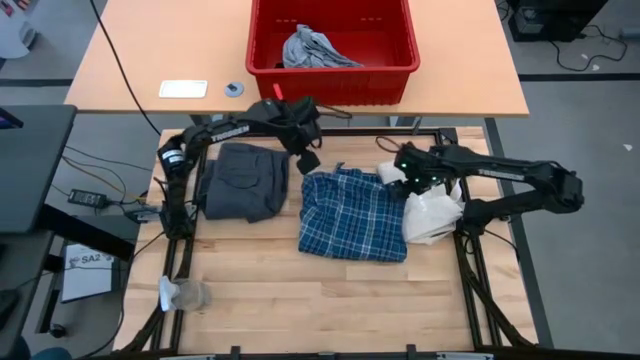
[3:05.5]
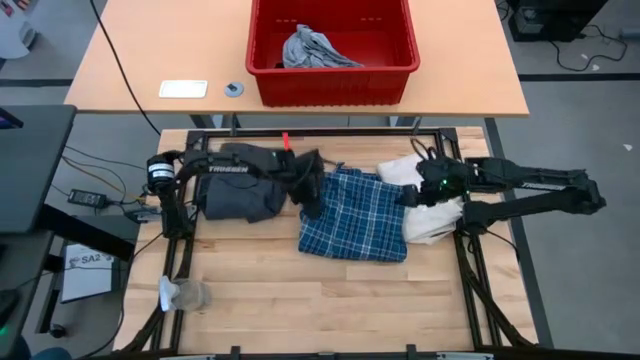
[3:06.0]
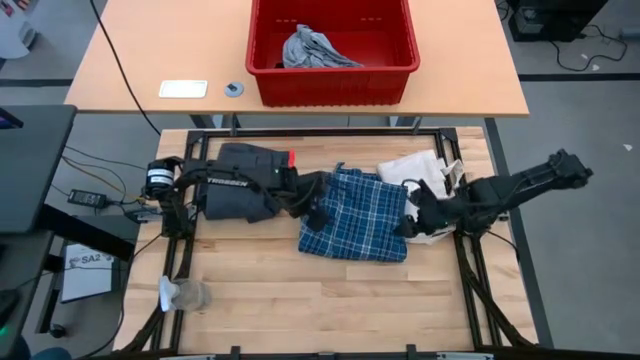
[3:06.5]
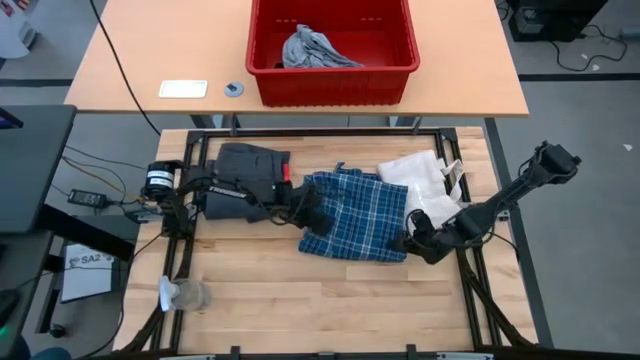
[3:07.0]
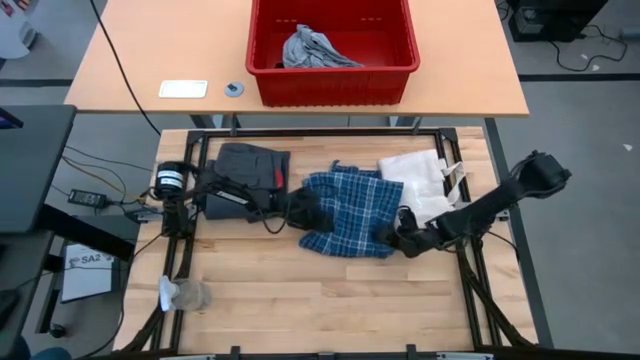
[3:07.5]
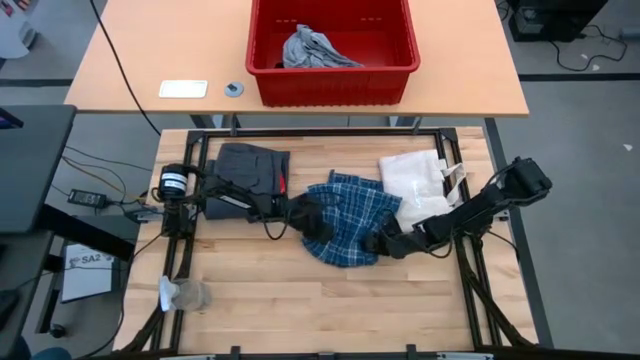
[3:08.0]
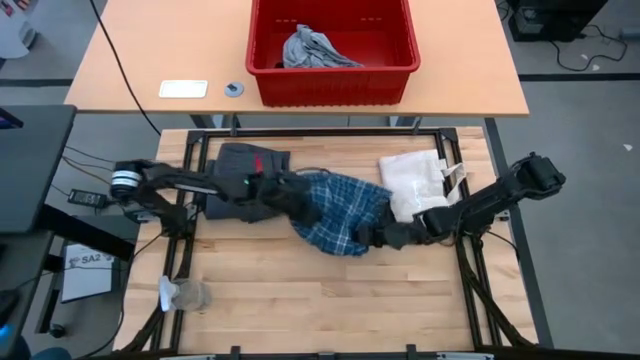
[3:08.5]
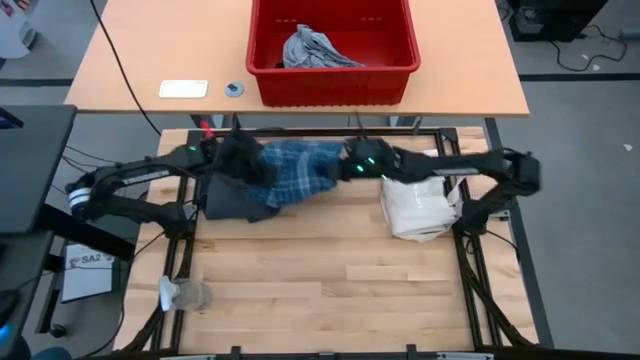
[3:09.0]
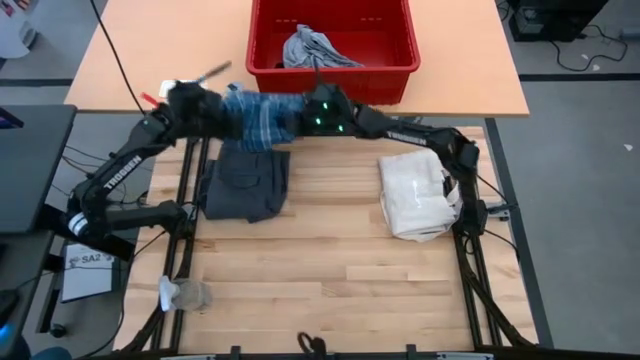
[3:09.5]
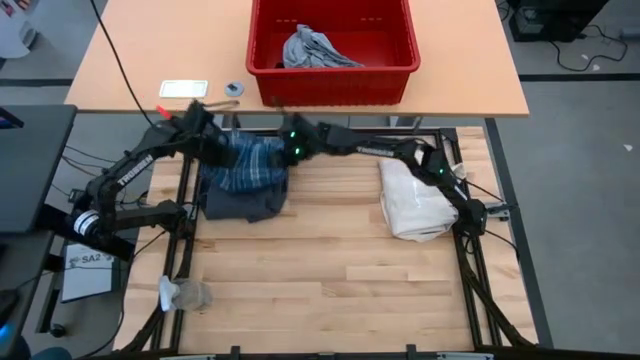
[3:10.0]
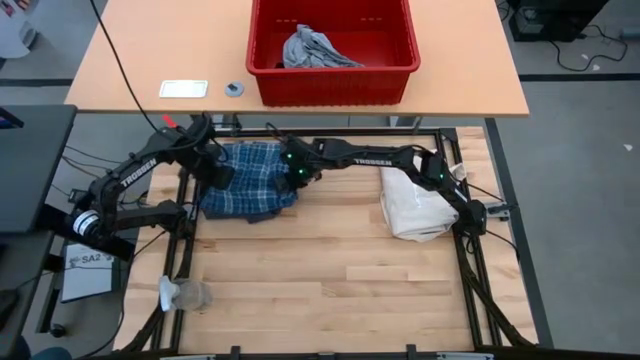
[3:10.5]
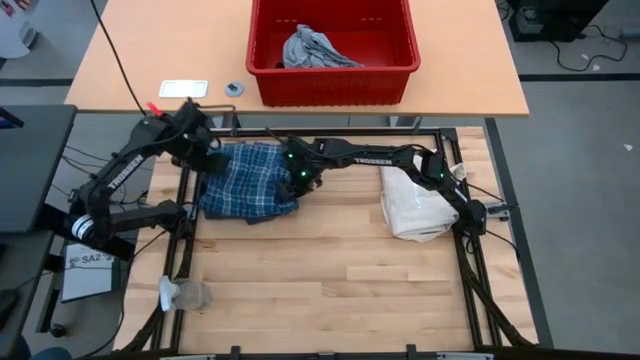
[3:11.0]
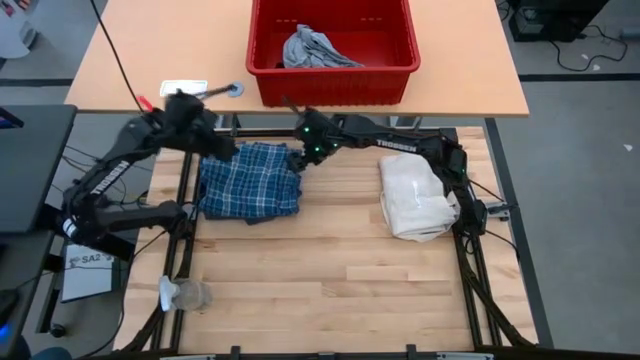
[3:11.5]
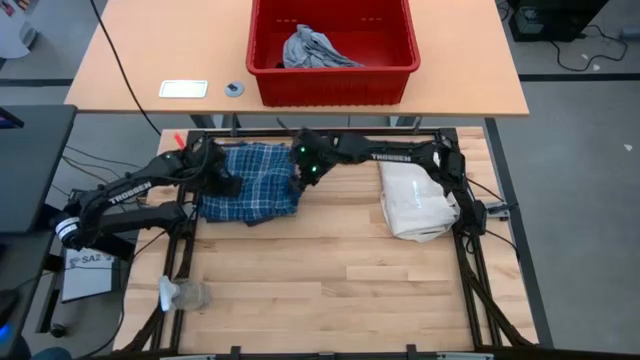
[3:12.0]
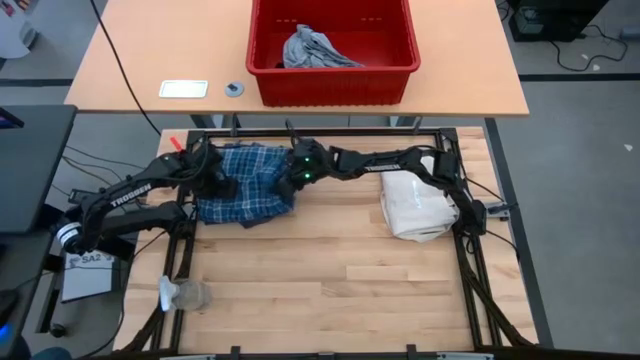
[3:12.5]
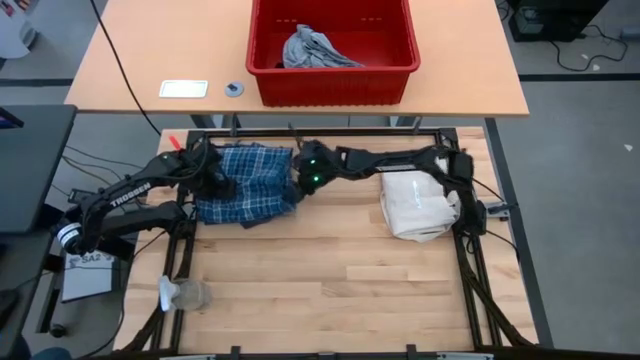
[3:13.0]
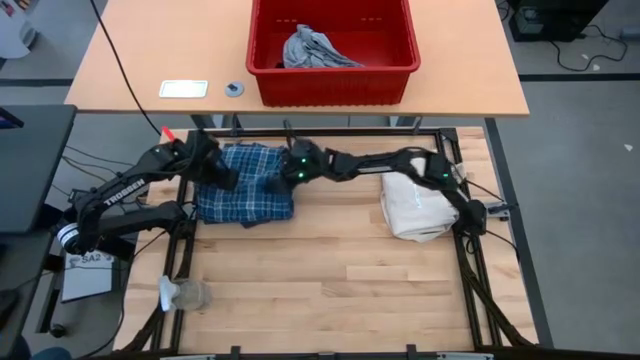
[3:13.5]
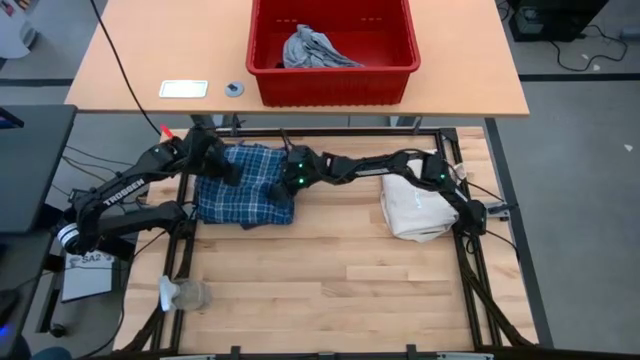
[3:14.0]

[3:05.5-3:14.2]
Task: Fold Laundry from Bin
Stack the plaid pants on top of the black shorts

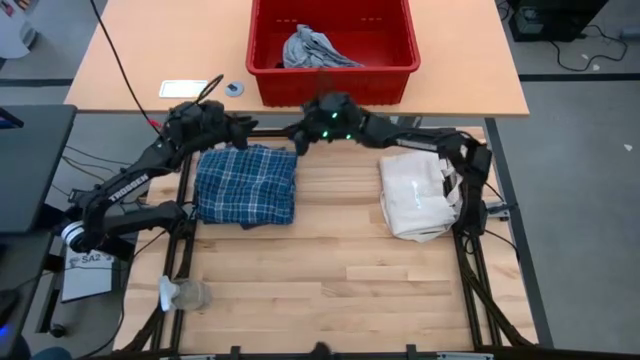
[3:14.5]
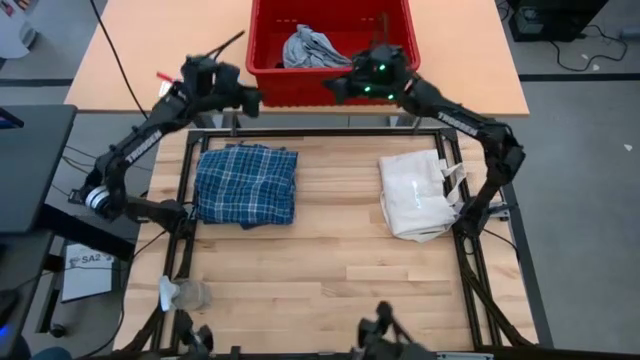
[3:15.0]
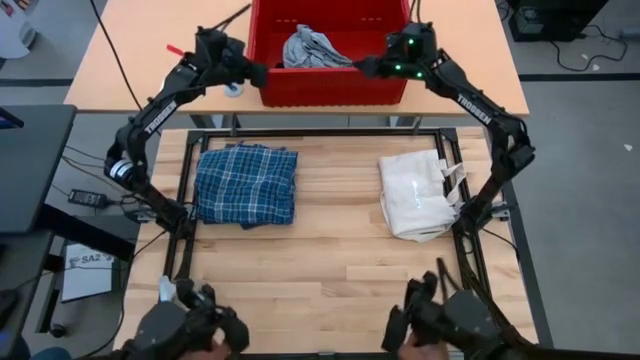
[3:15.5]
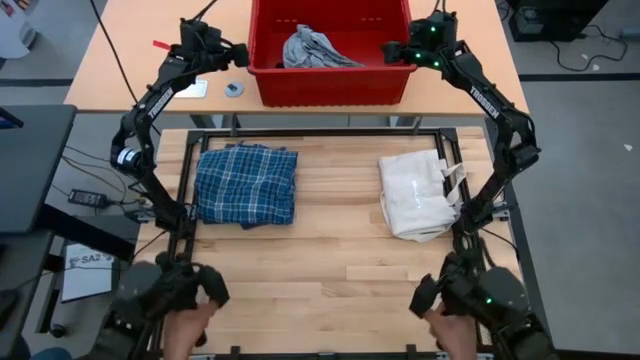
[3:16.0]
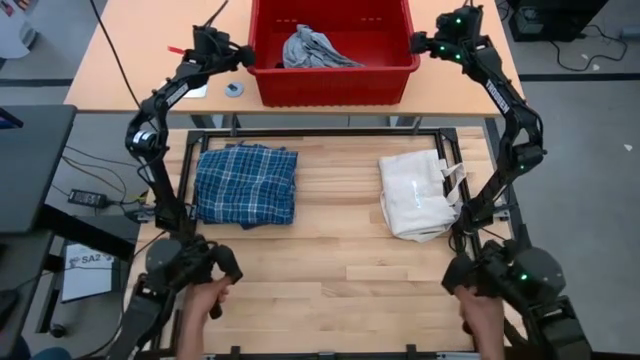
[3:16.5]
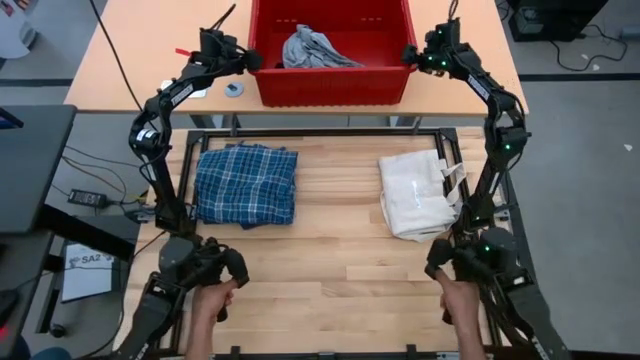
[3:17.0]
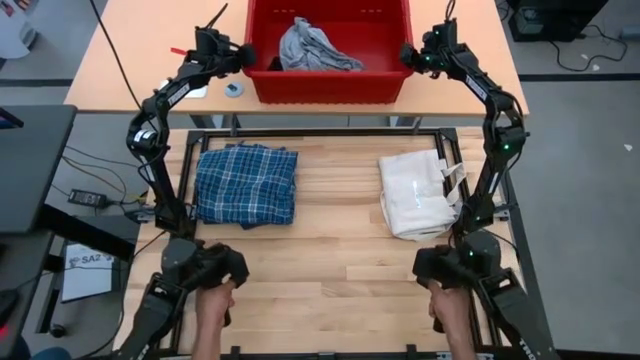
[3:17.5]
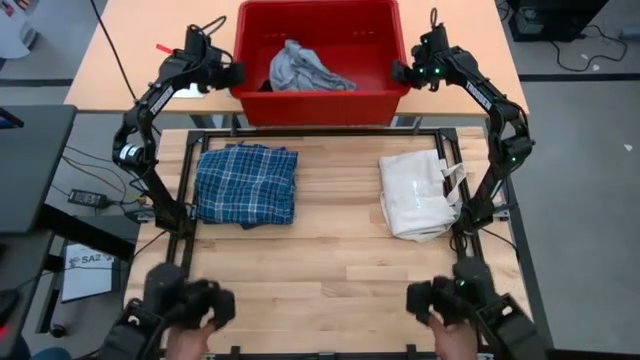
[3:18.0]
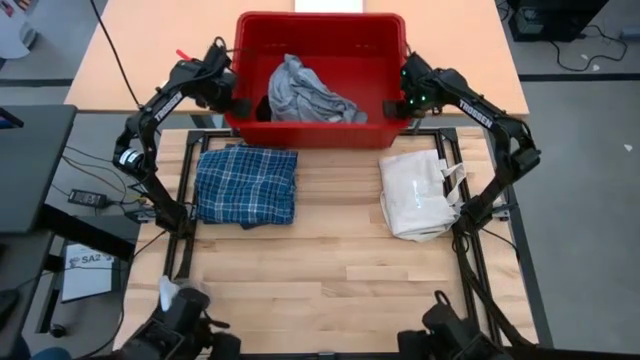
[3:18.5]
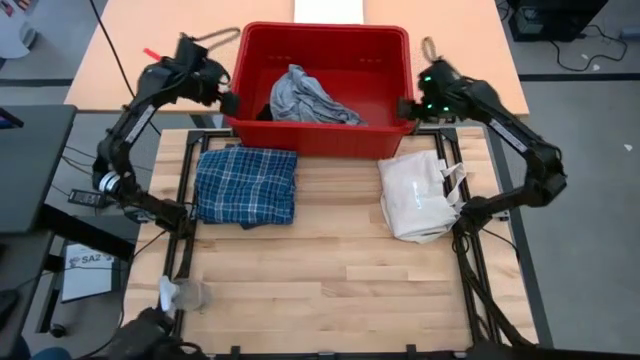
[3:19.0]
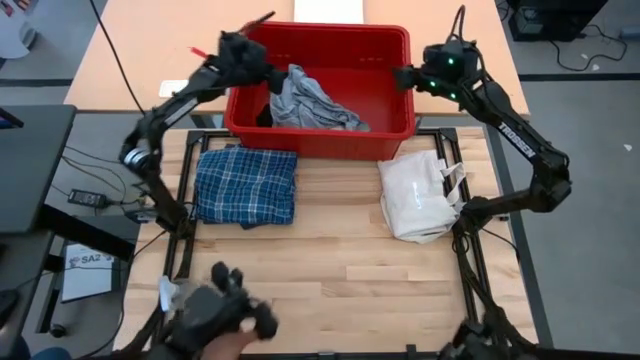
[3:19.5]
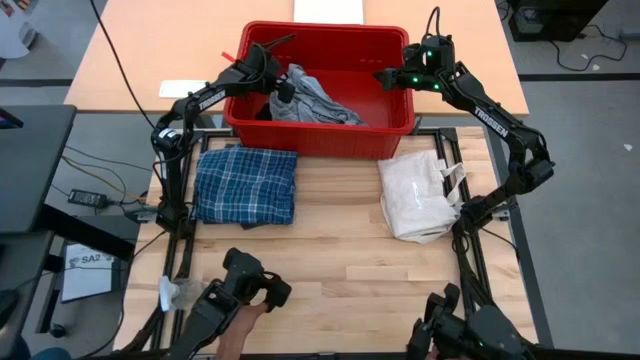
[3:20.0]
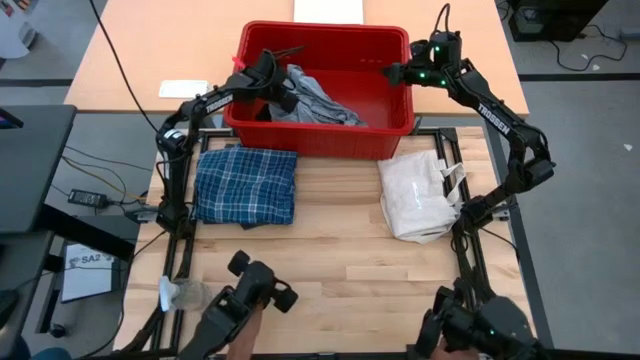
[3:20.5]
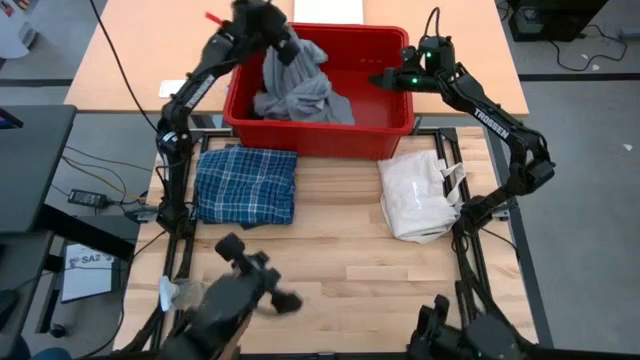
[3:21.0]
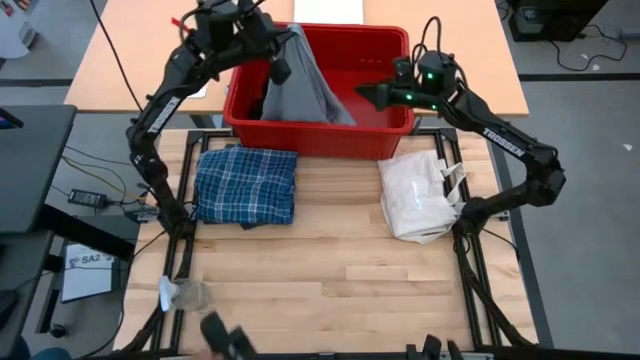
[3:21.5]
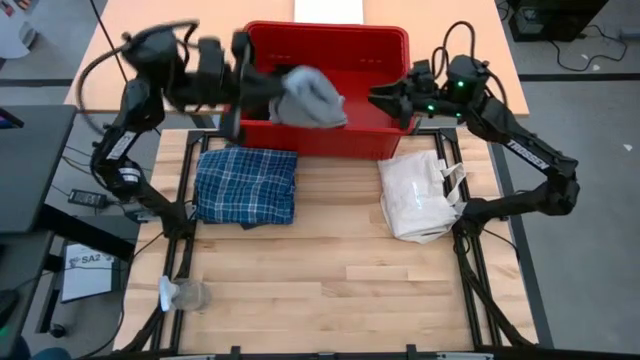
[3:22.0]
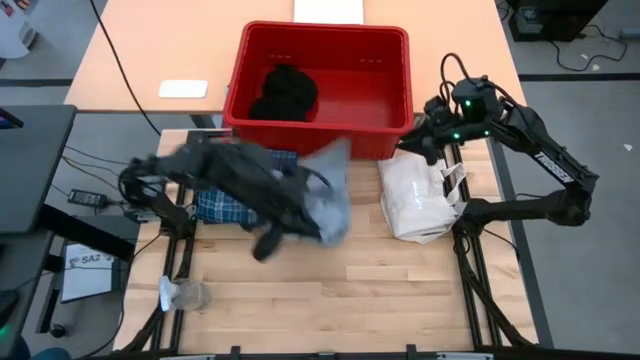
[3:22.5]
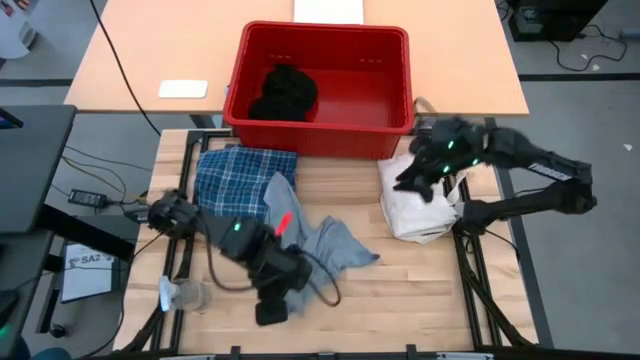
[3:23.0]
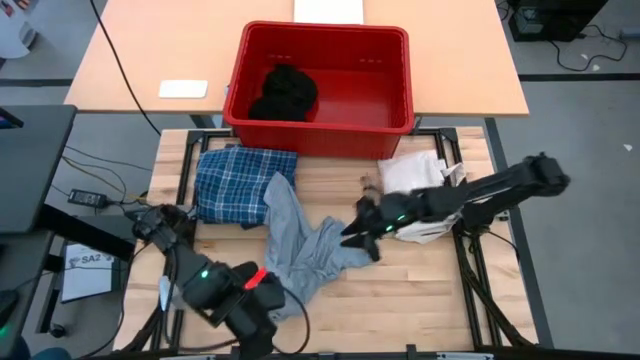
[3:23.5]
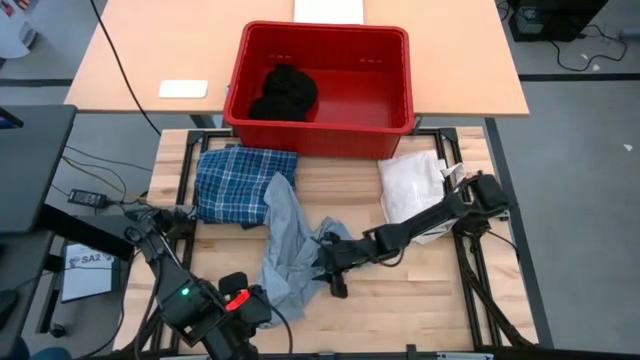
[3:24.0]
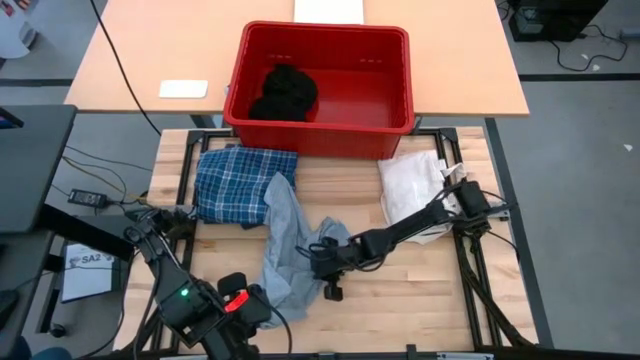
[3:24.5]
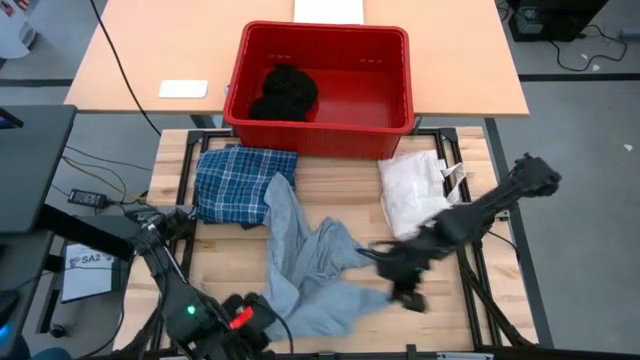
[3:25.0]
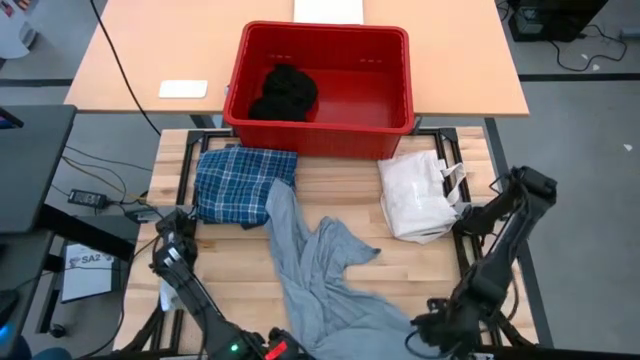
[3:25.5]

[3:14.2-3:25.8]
Remove the gray shirt from the laundry bin

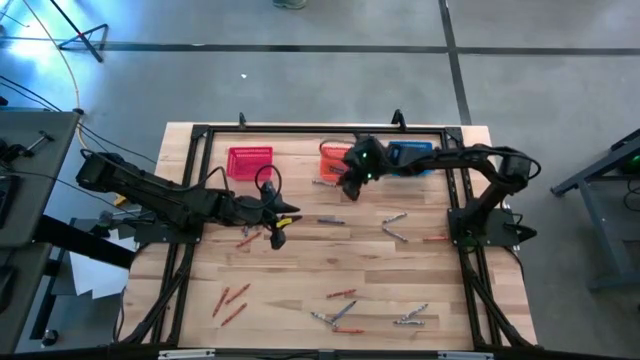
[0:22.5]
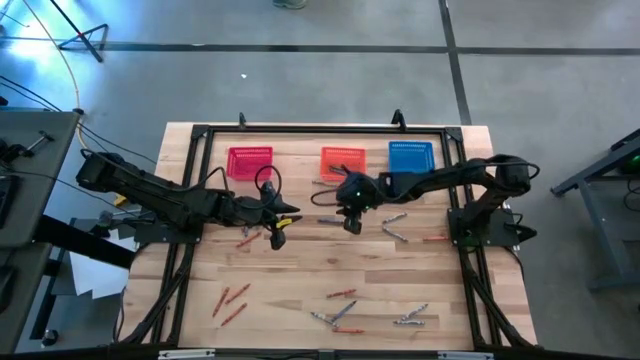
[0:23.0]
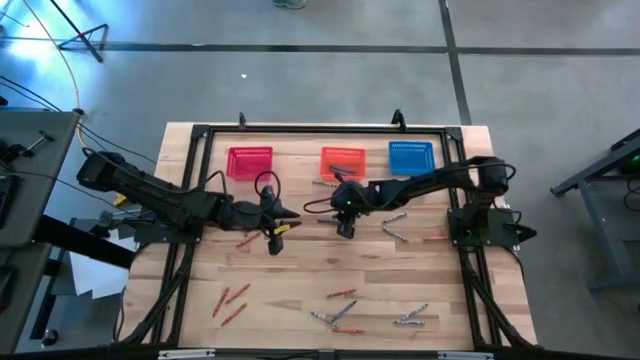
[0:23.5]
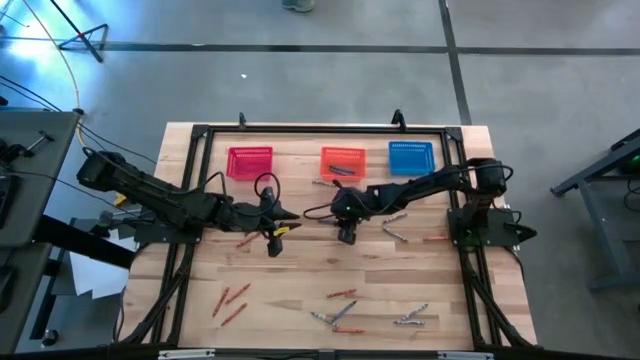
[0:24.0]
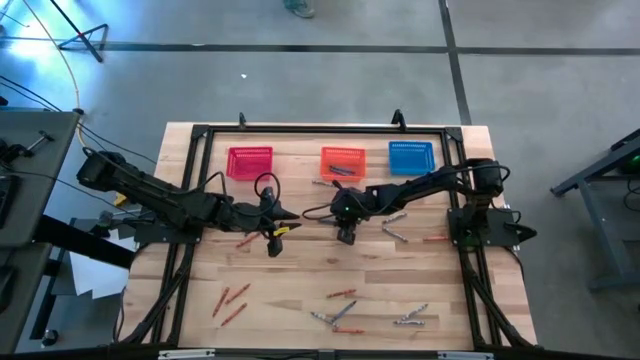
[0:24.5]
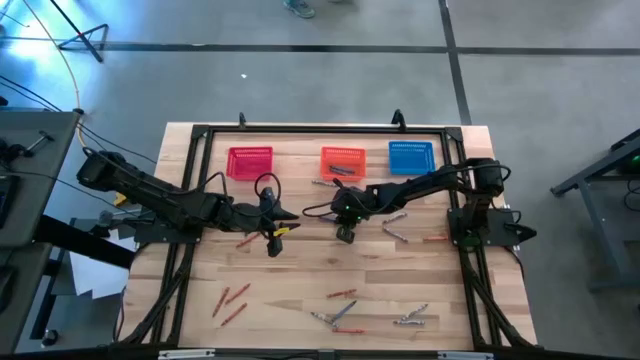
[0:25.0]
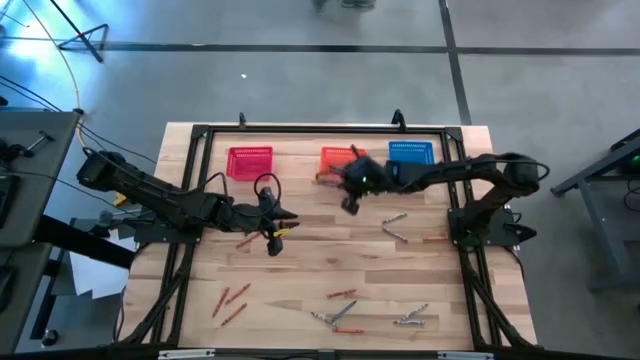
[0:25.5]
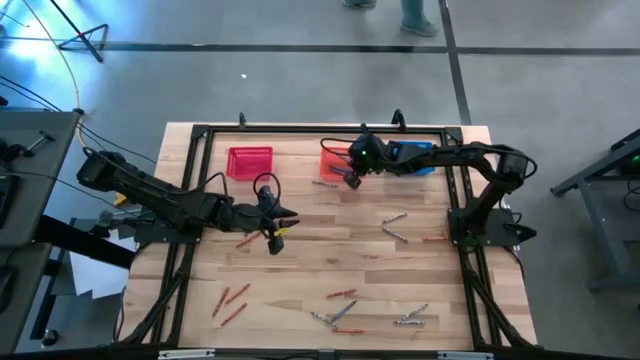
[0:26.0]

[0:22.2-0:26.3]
Task: Sort crayons
Put the blue crayon into the orange bin
